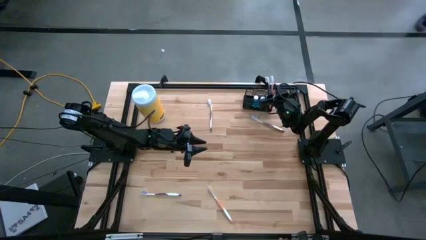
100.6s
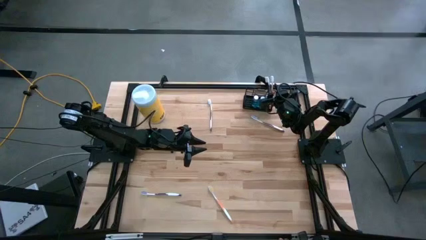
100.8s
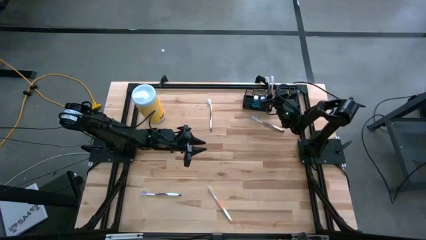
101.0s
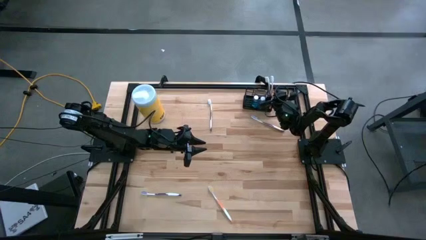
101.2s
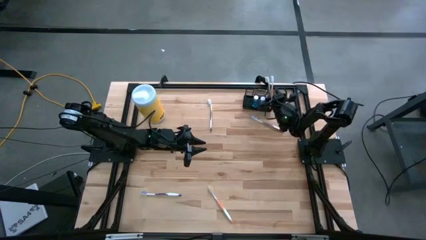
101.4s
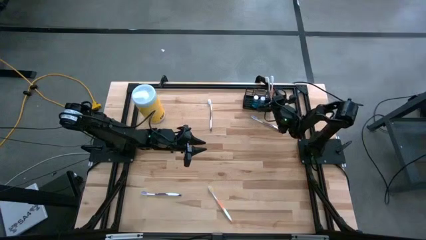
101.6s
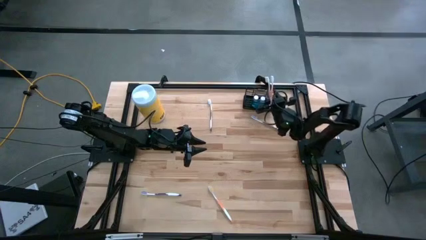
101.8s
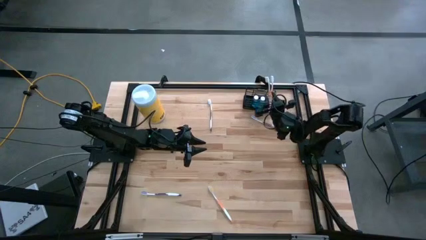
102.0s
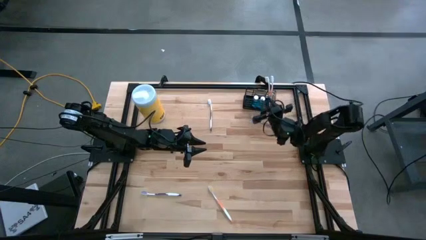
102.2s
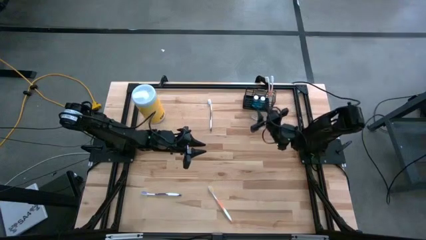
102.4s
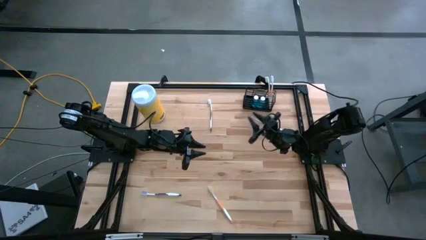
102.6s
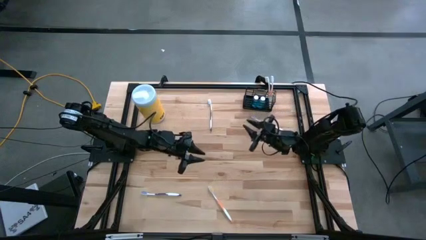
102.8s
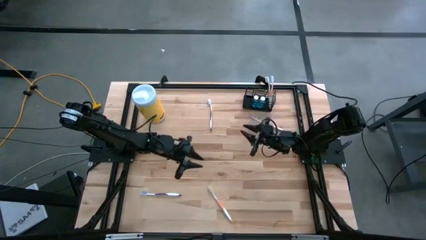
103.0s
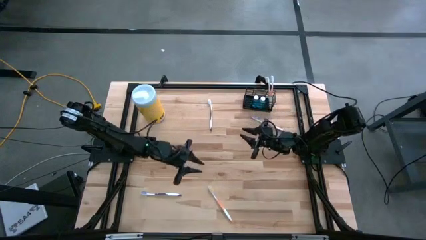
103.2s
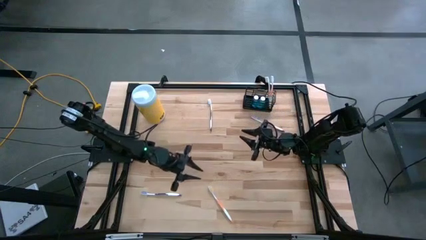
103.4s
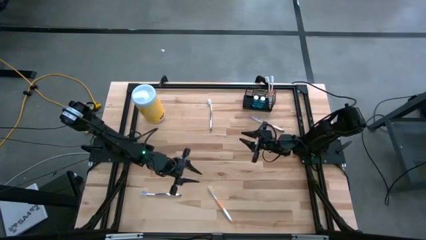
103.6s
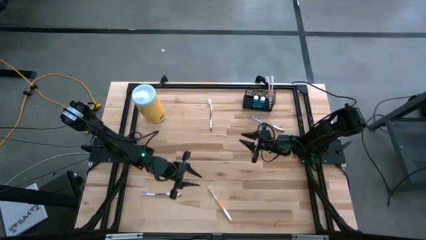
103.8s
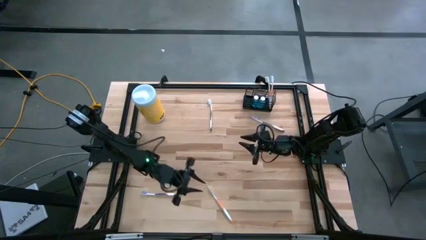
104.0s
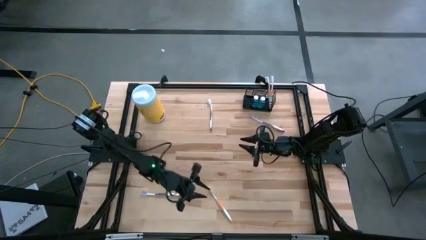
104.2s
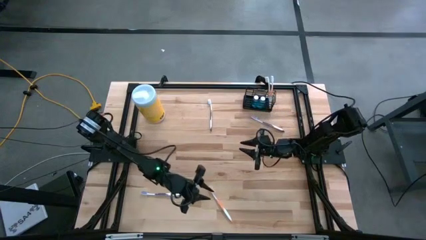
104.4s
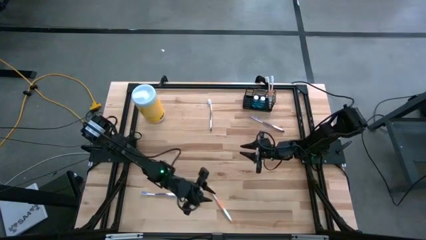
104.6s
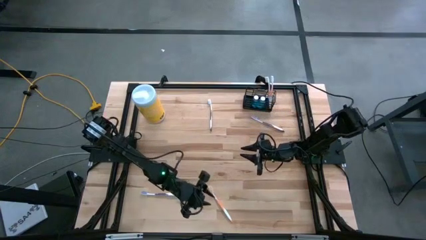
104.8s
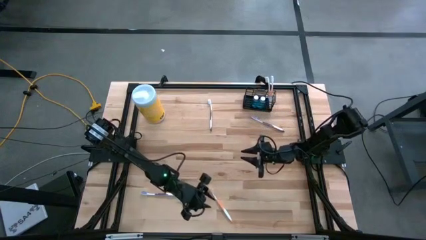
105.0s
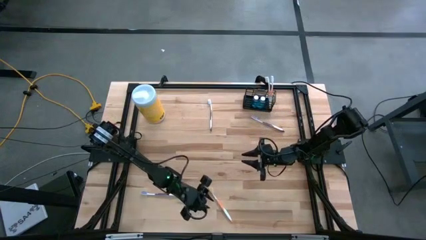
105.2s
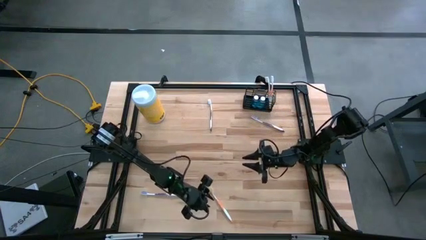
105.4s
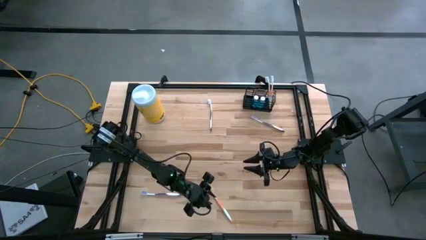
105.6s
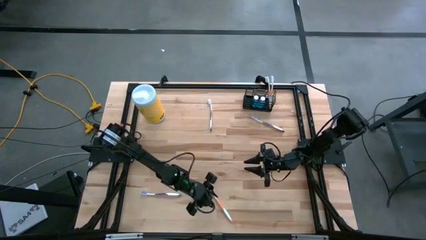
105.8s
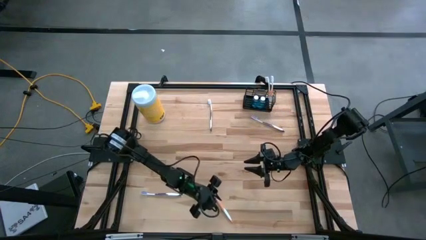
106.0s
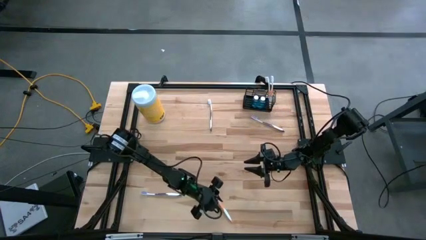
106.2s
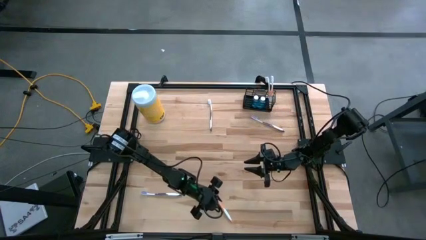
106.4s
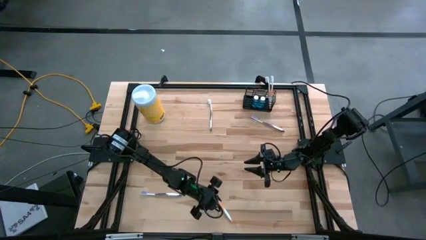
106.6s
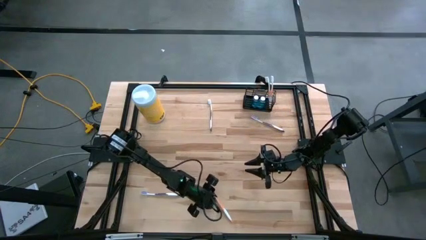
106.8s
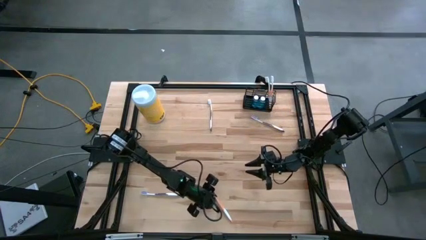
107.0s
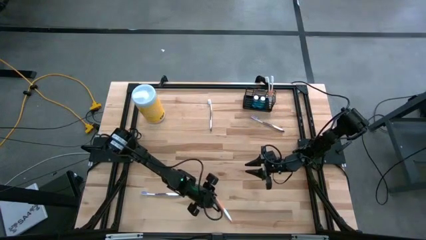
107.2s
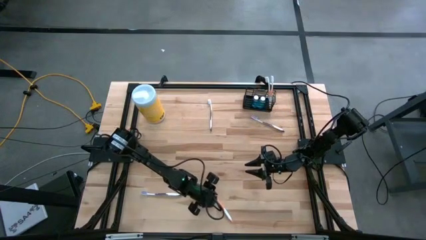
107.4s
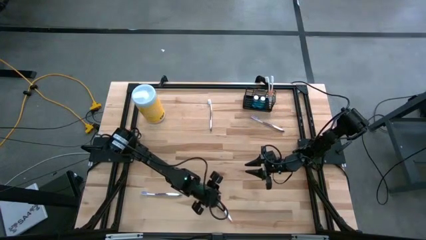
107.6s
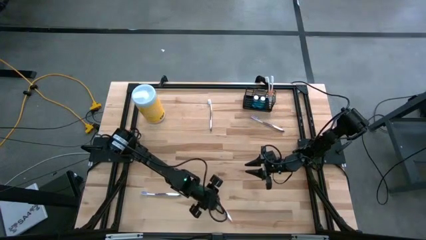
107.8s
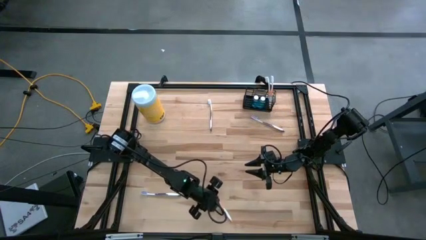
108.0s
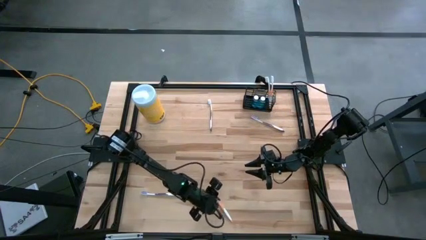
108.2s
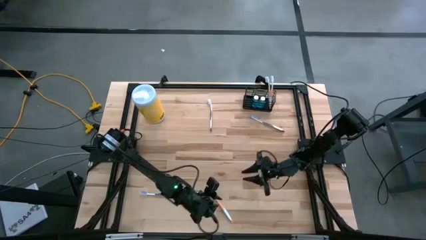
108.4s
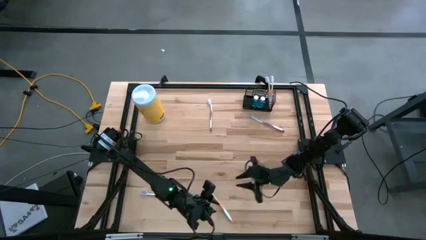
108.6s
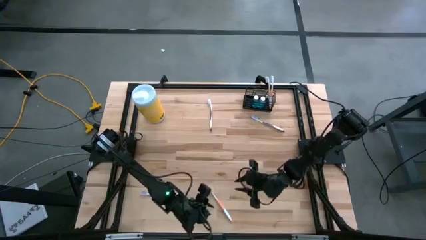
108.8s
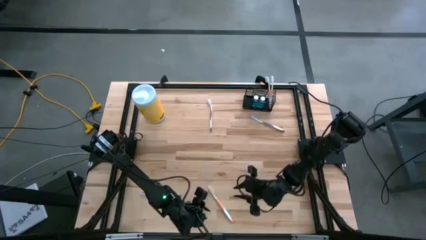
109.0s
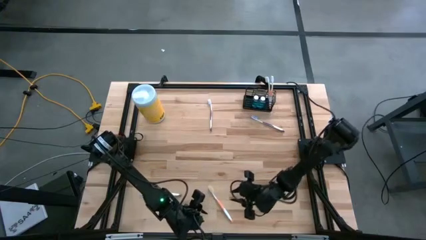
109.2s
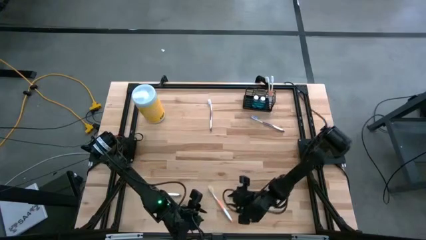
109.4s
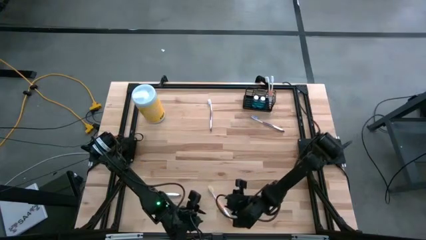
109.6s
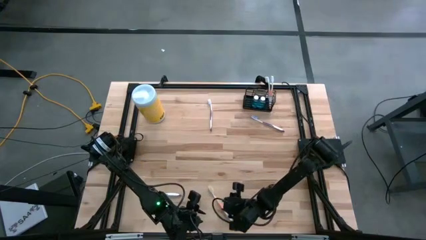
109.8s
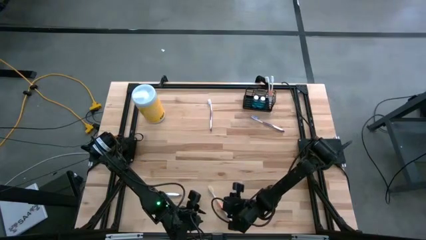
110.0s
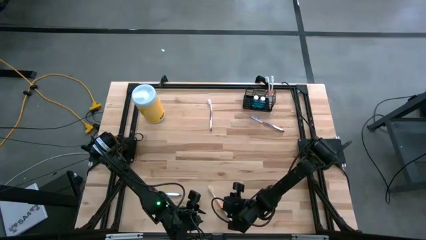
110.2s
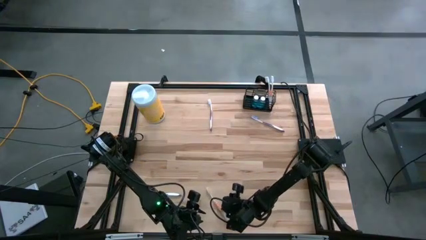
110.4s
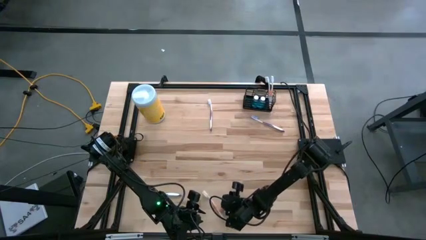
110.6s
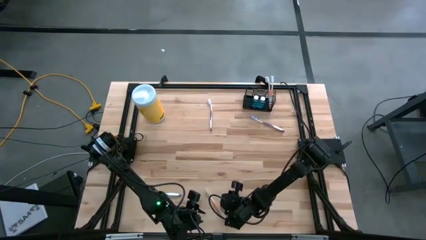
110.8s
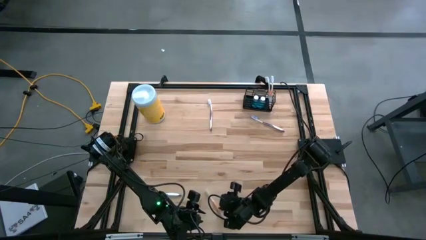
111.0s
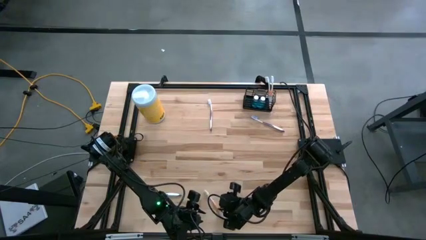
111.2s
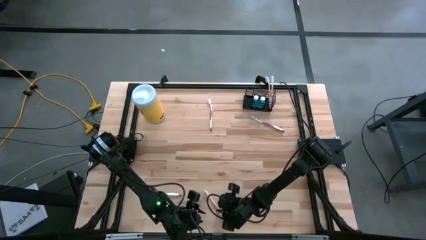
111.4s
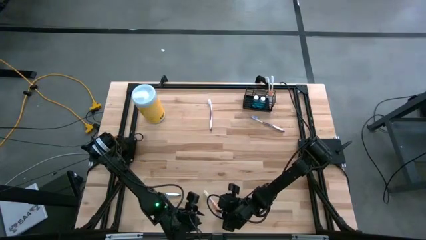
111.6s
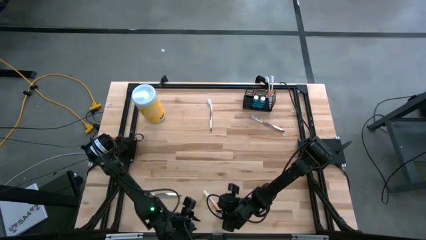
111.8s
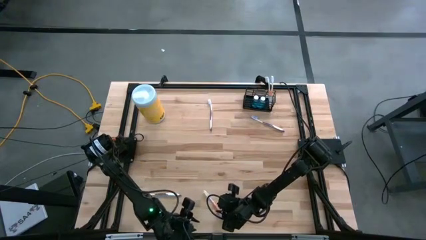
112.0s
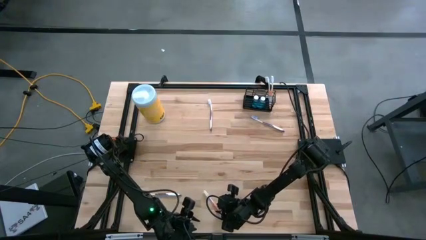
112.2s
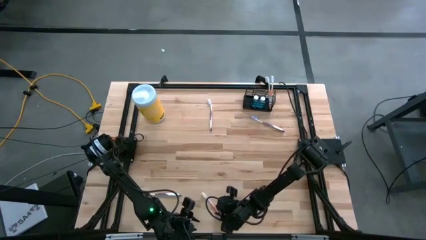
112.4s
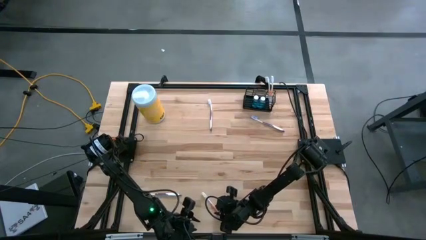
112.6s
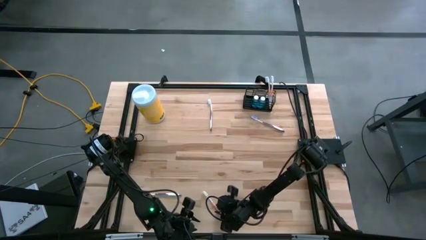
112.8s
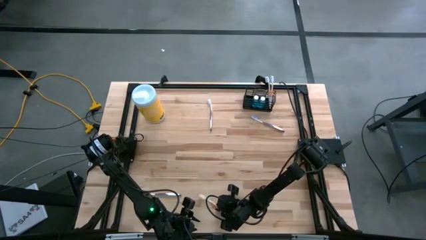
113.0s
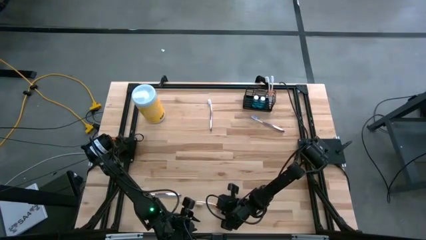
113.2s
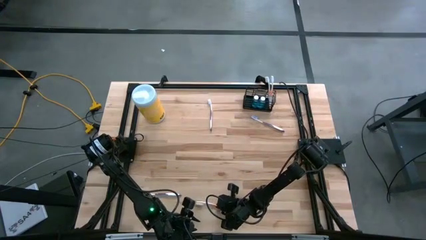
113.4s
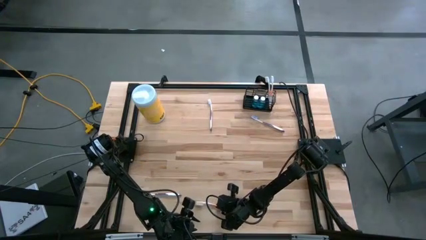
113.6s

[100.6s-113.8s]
Task: Pick & Place toothbrushing station
Put the orange toothbrush into the black wire organizer

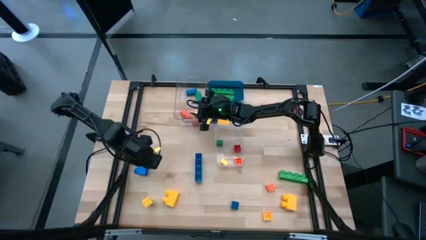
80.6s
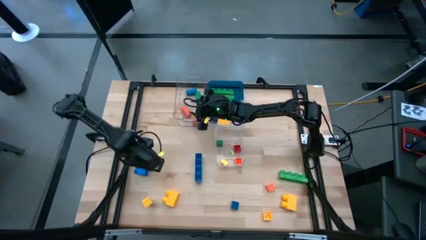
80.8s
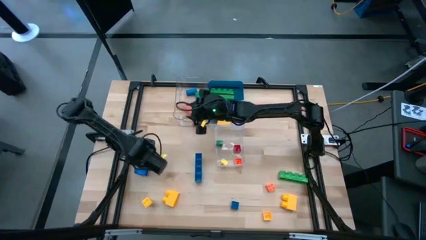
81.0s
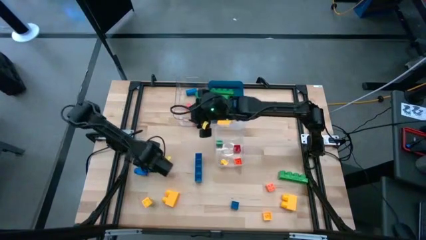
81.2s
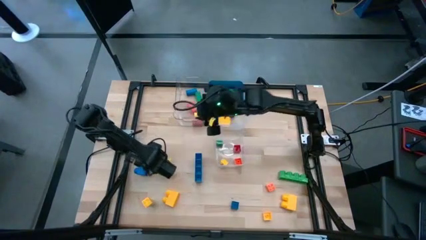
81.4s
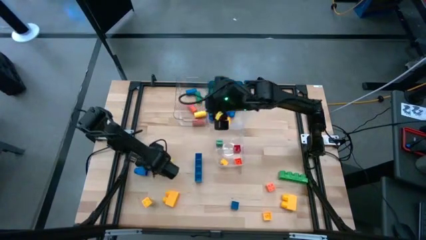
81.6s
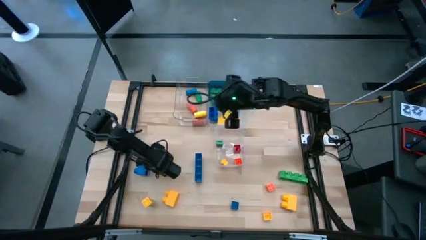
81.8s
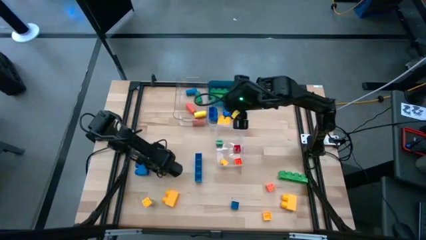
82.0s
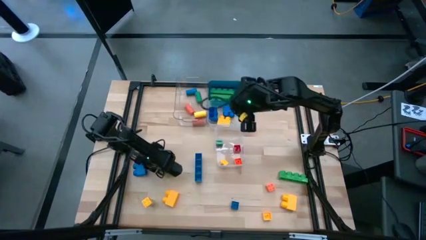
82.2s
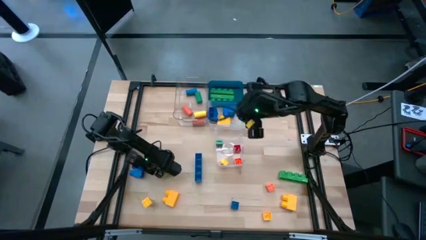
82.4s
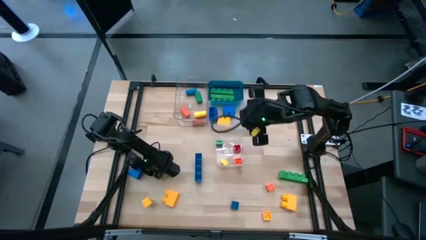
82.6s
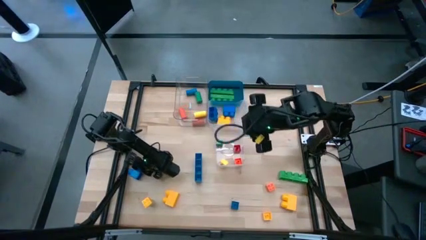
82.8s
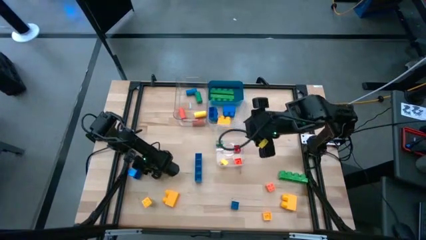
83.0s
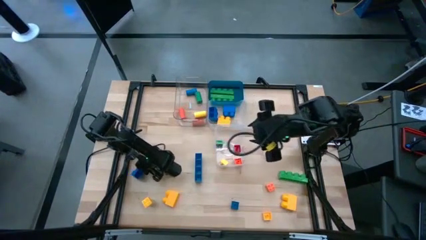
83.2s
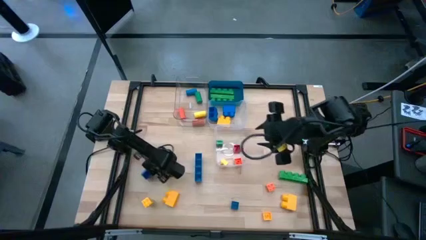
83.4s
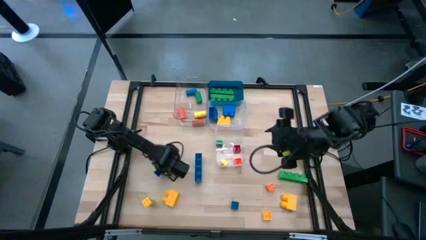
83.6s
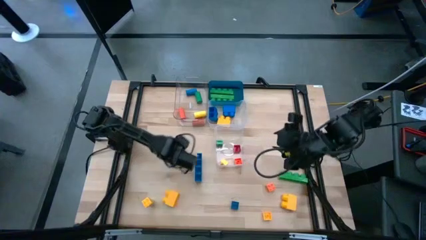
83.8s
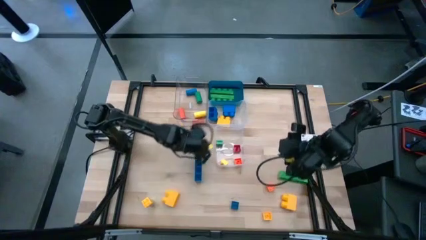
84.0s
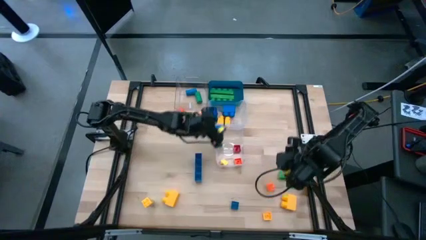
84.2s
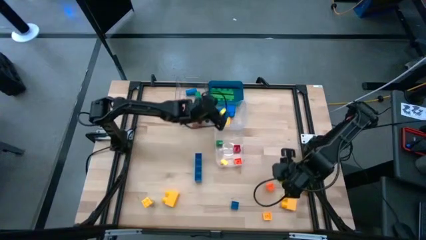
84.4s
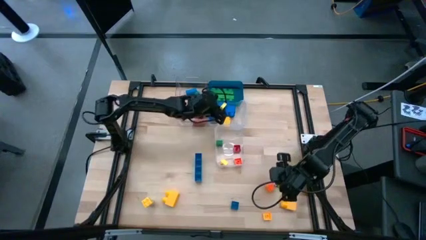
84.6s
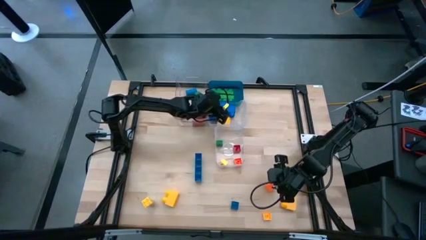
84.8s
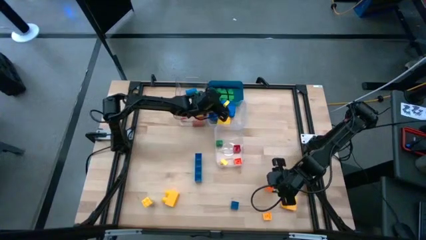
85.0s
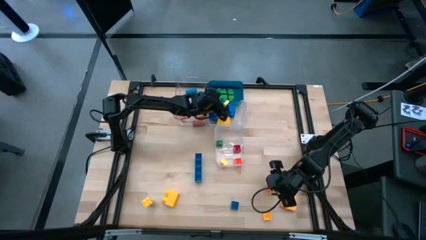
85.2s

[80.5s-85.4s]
Task: Sort blocks by size
Put the blue 2 stud game piece into the top right transparent bin
